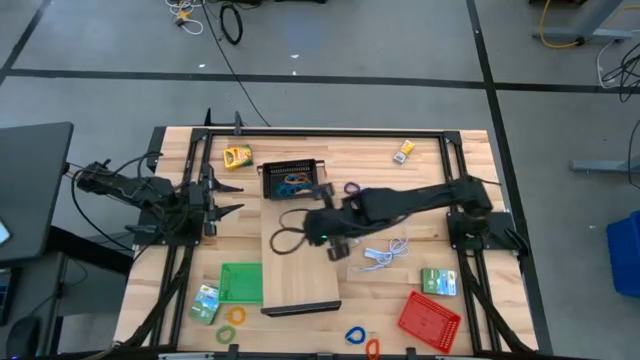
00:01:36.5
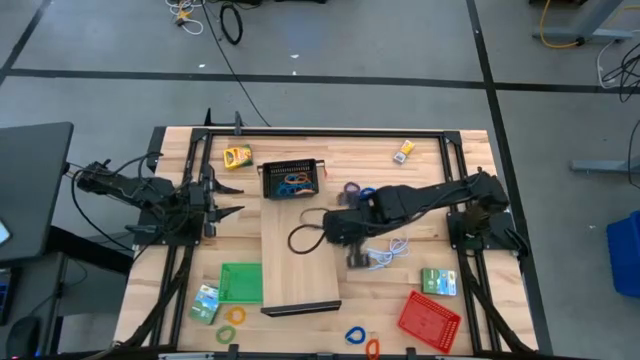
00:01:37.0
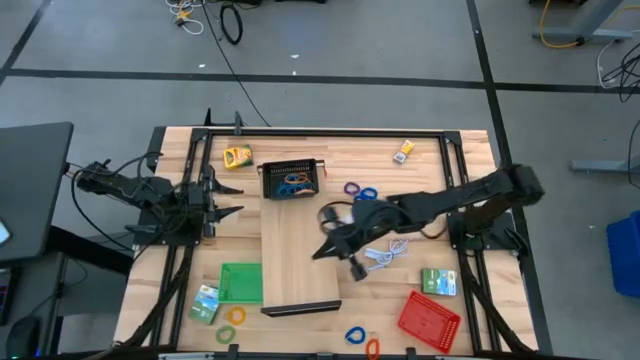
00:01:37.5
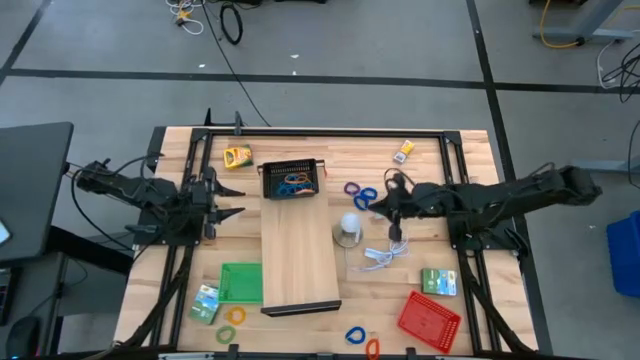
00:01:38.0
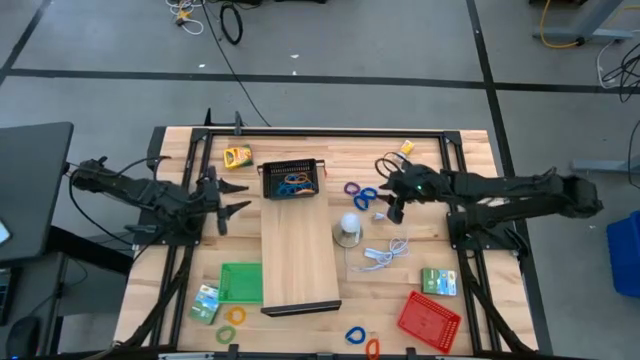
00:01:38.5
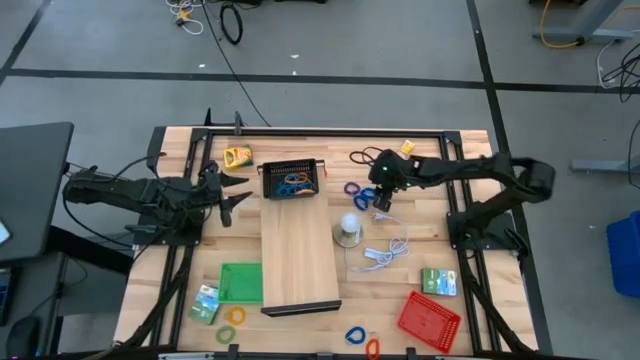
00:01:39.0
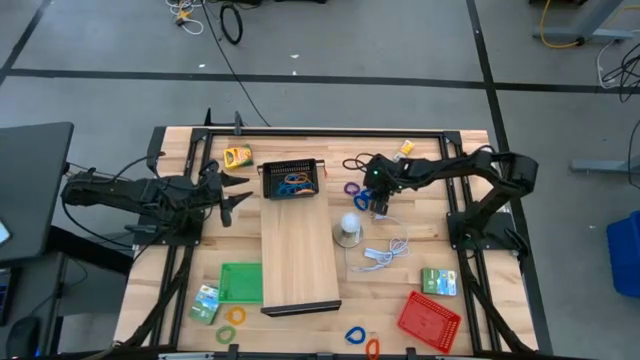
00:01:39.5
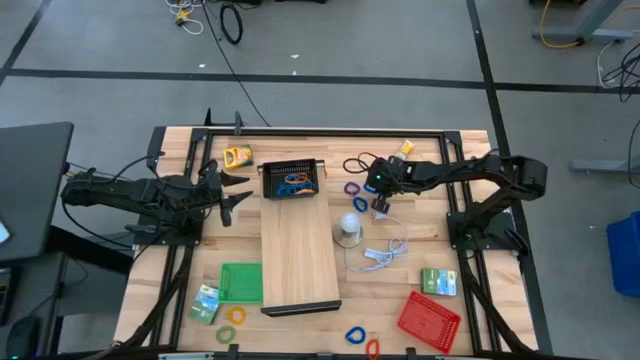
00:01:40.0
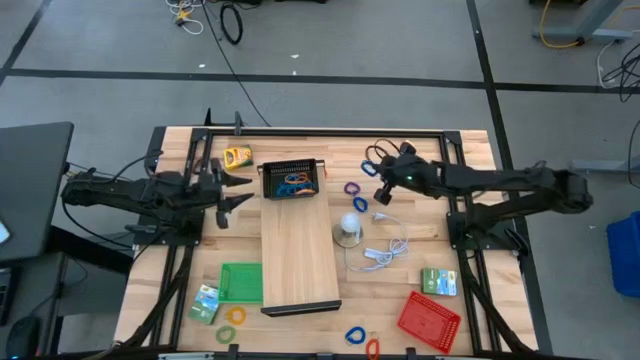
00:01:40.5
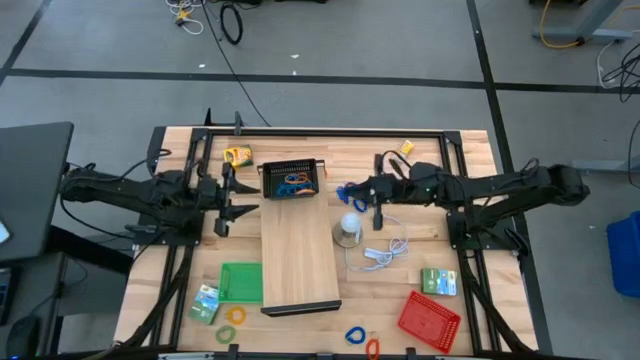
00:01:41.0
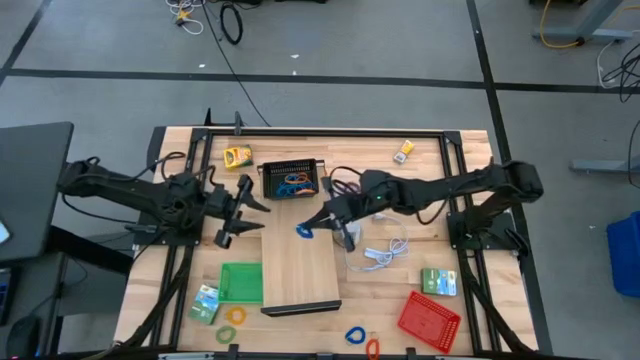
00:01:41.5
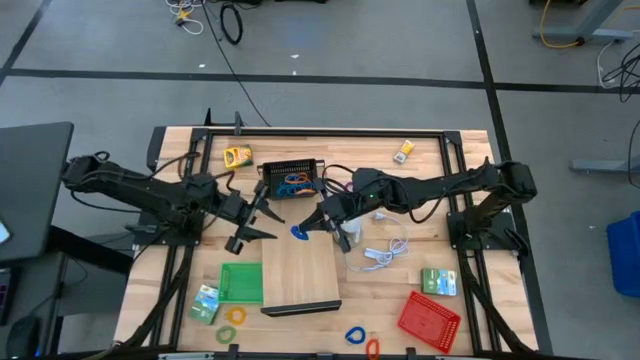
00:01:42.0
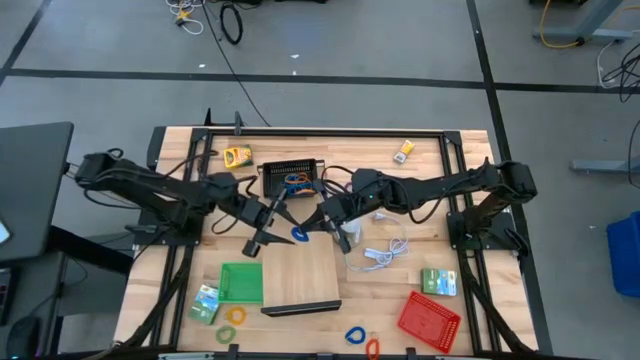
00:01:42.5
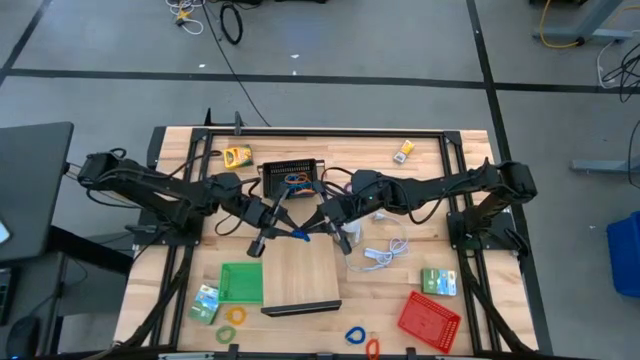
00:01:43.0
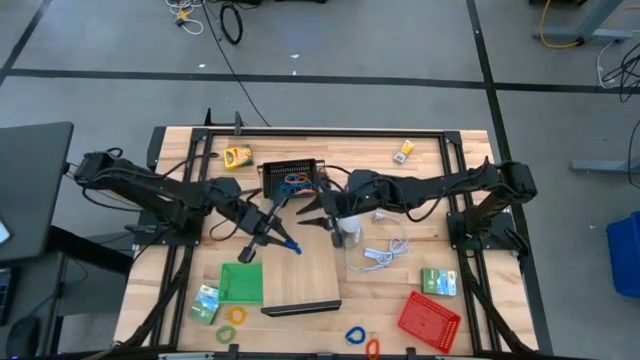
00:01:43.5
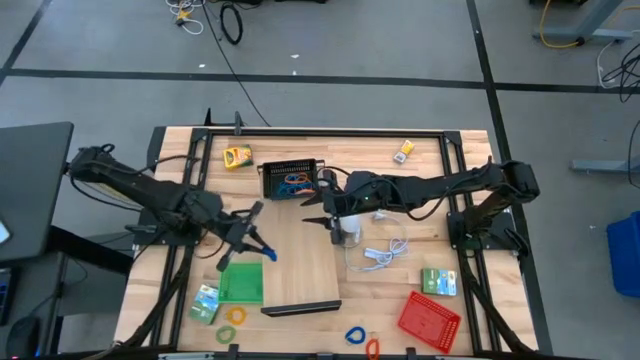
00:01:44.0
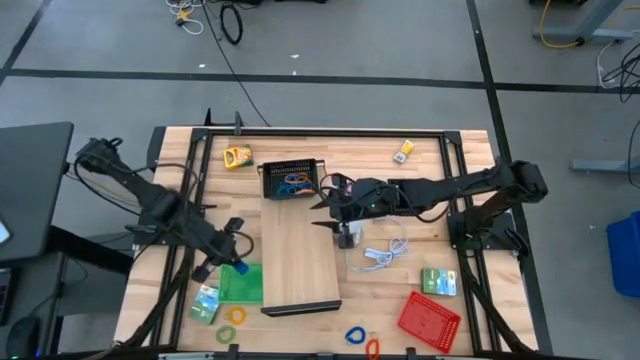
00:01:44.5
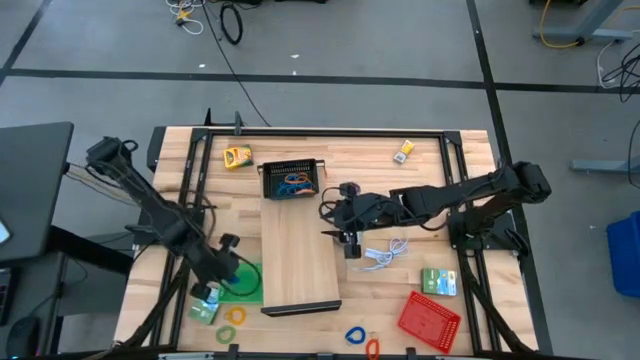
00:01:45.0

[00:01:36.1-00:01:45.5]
Task: Pick & Place Office Desk Supplies
Put the top blue spiral keychain into the green bin

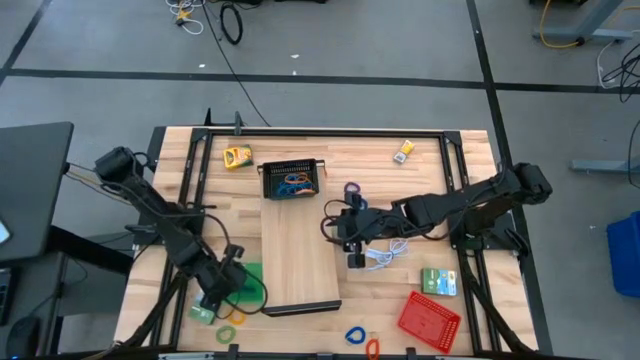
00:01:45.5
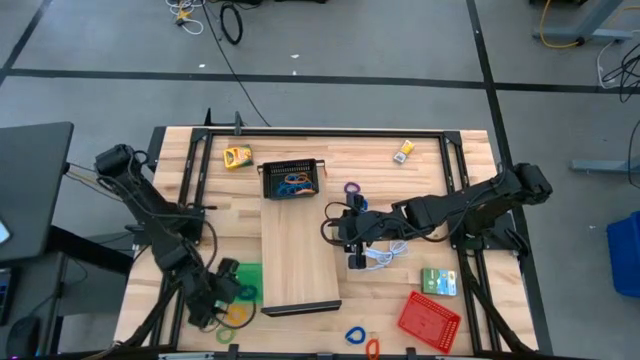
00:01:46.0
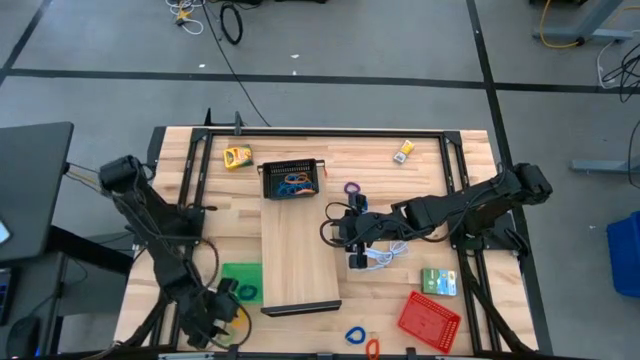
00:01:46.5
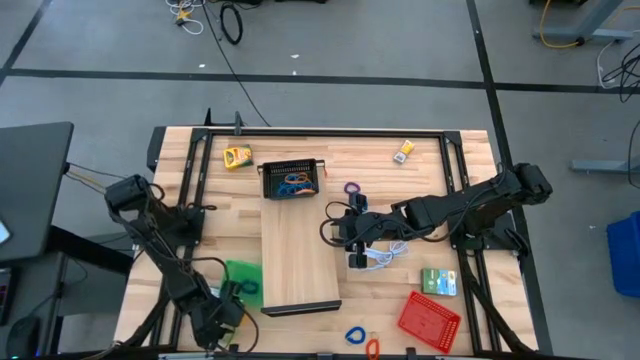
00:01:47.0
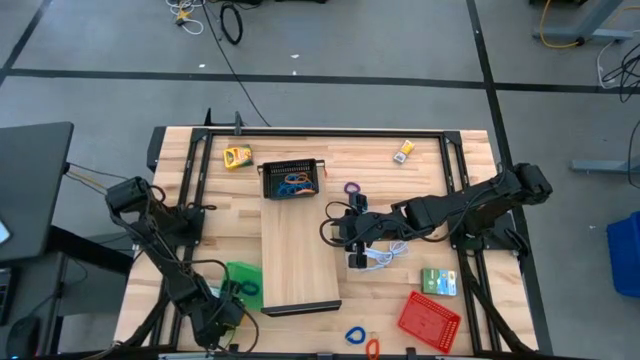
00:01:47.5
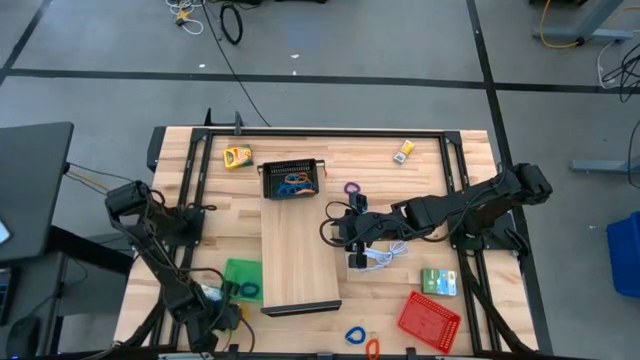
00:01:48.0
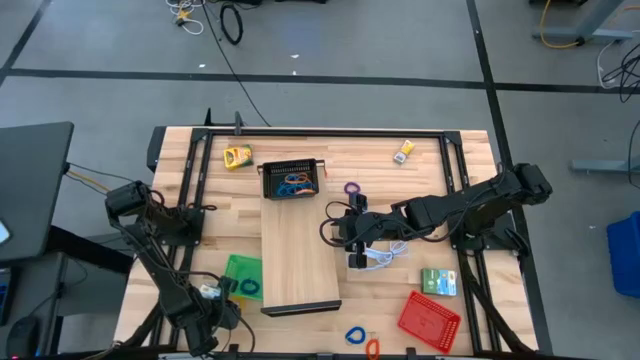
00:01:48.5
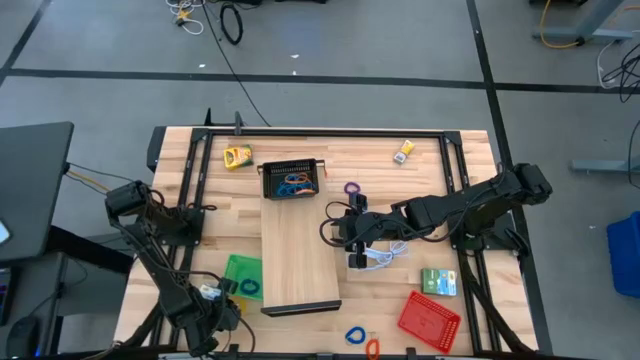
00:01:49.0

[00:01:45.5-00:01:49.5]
Put the green spiral keychain into the green bin

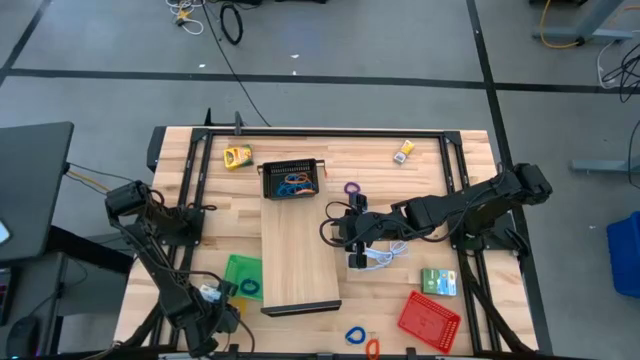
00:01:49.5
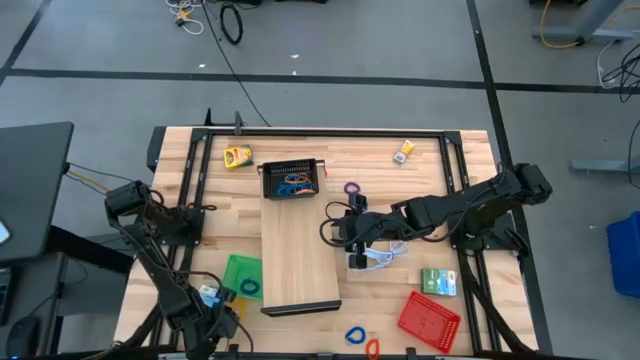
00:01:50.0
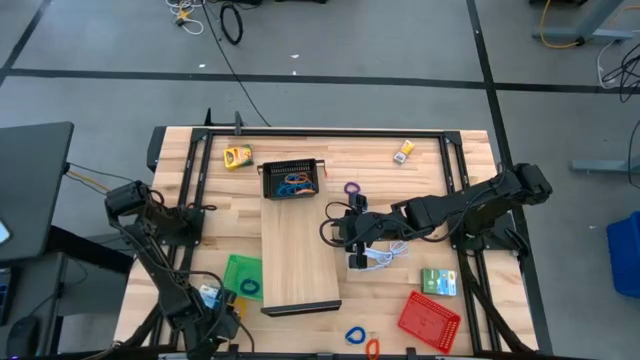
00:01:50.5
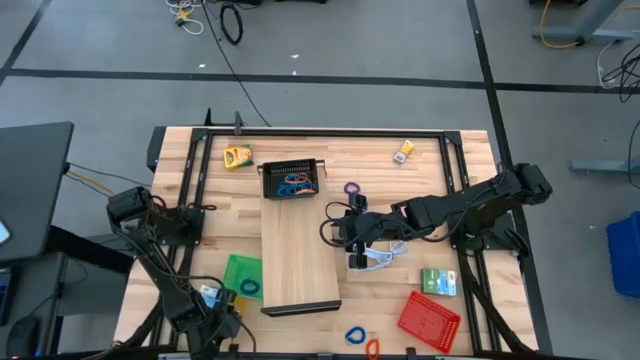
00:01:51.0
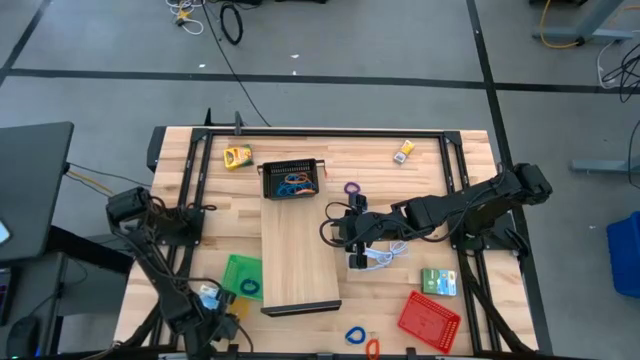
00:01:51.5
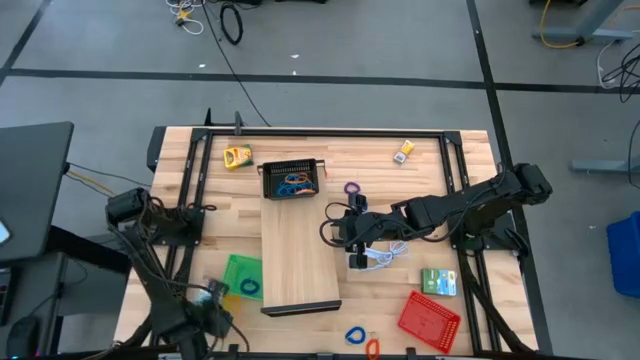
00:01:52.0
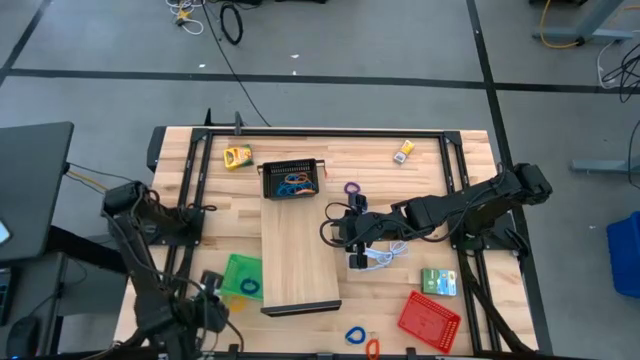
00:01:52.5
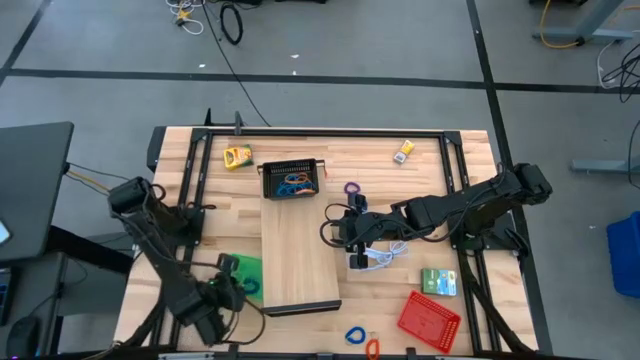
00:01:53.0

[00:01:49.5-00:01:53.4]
Put the green spiral keychain into the green bin

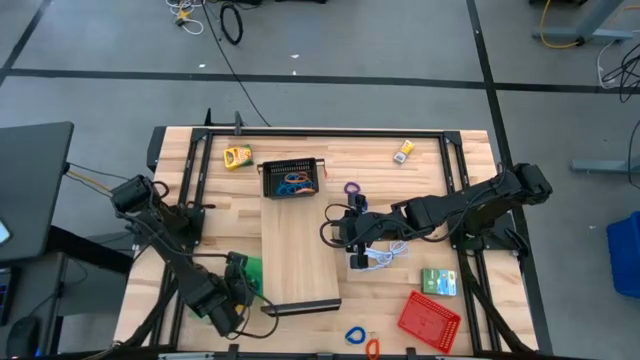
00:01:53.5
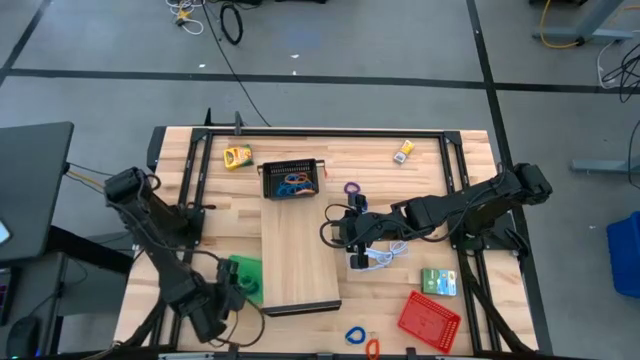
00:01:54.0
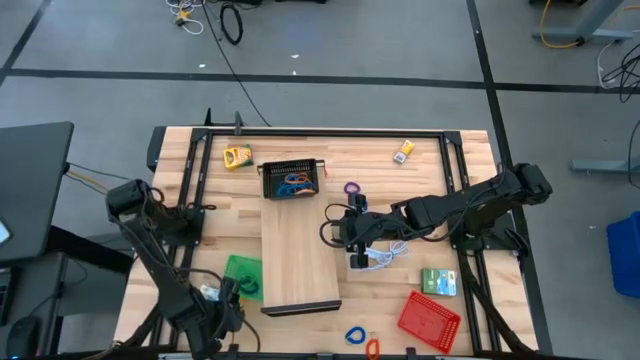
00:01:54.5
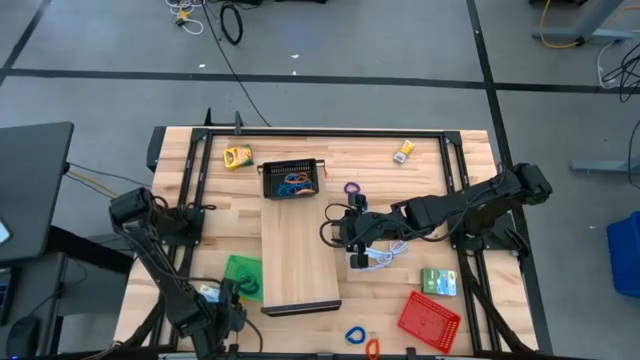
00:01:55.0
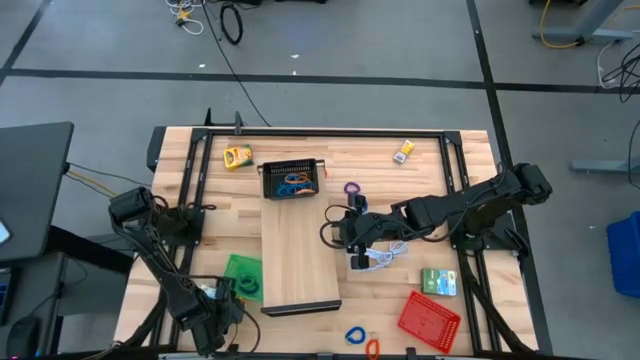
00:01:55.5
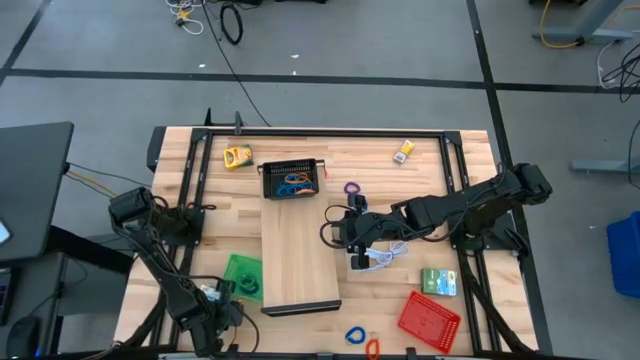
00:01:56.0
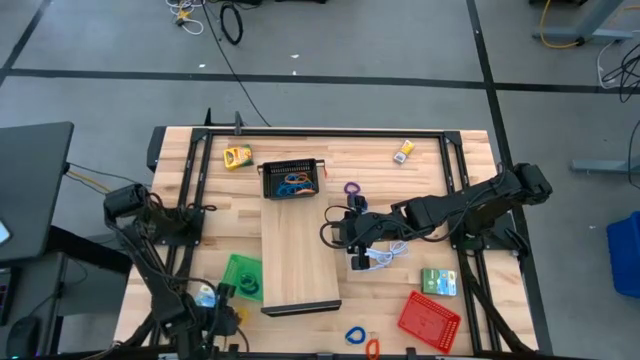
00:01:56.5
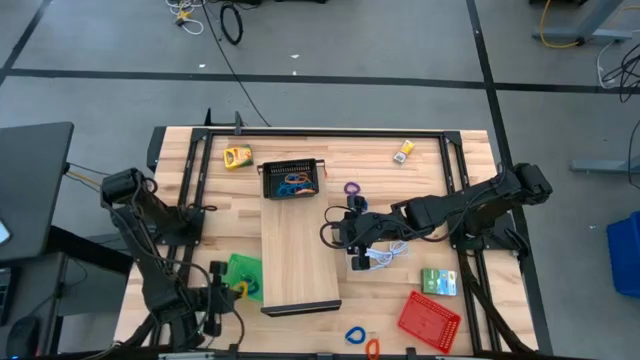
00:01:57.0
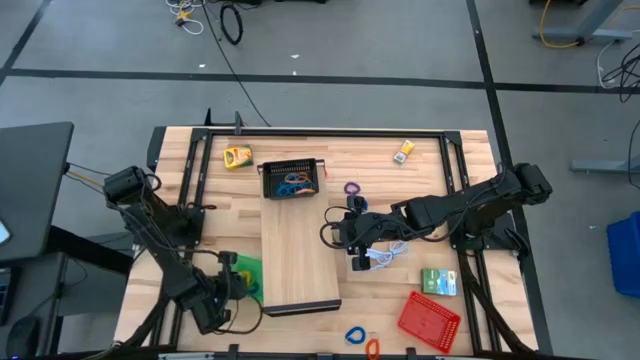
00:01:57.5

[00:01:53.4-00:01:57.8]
Put the yellow spiral keychain into the green bin
